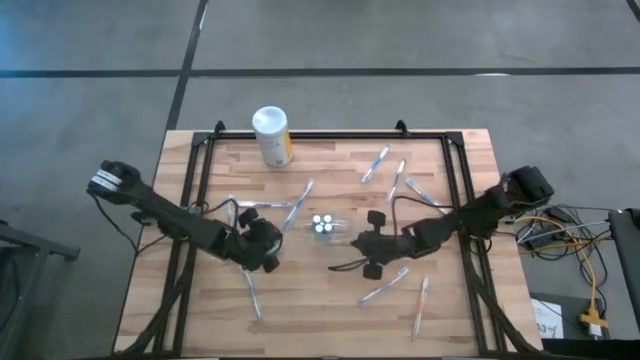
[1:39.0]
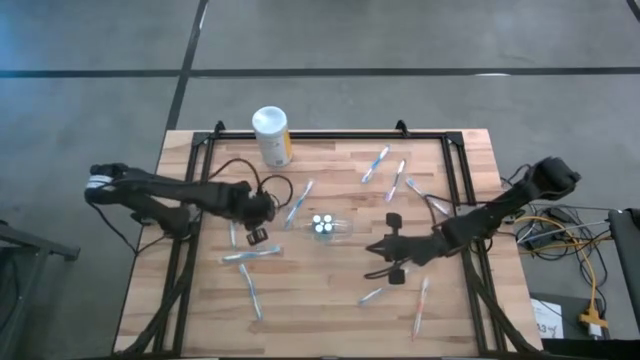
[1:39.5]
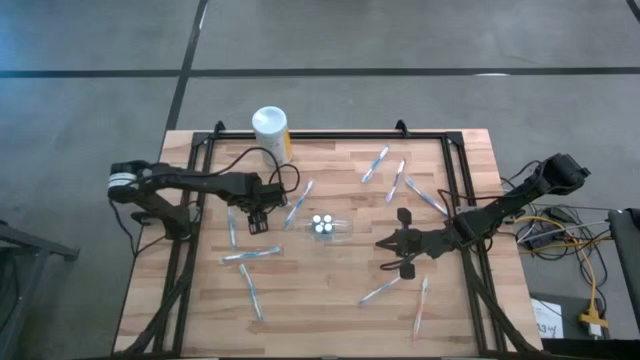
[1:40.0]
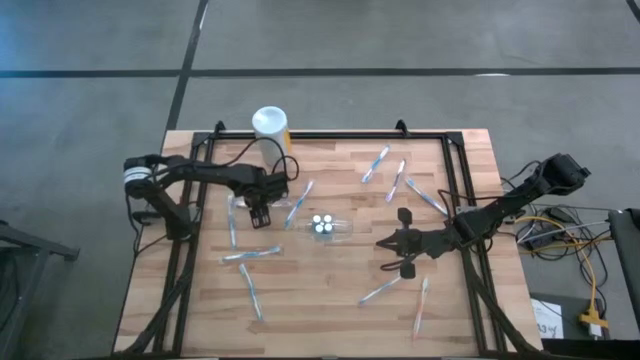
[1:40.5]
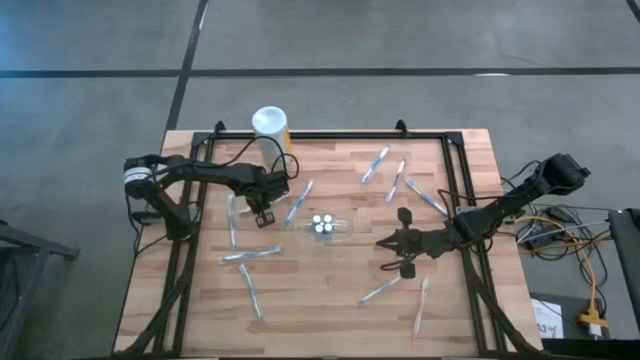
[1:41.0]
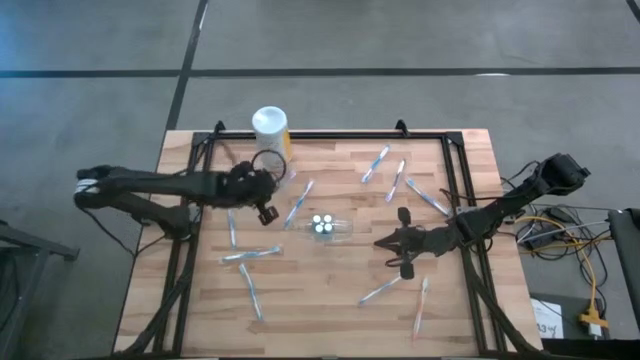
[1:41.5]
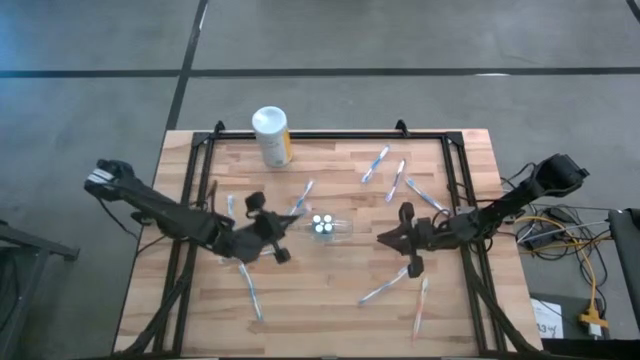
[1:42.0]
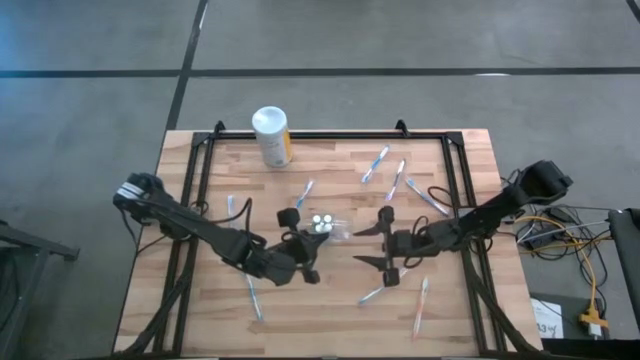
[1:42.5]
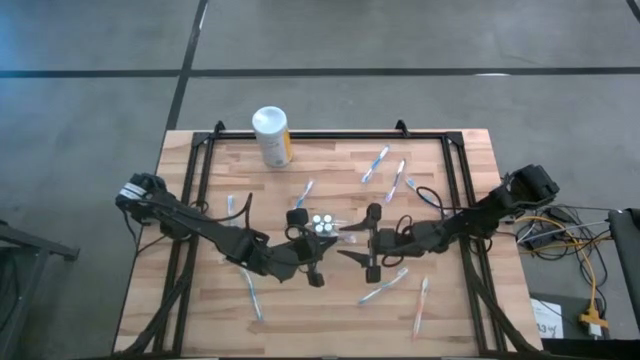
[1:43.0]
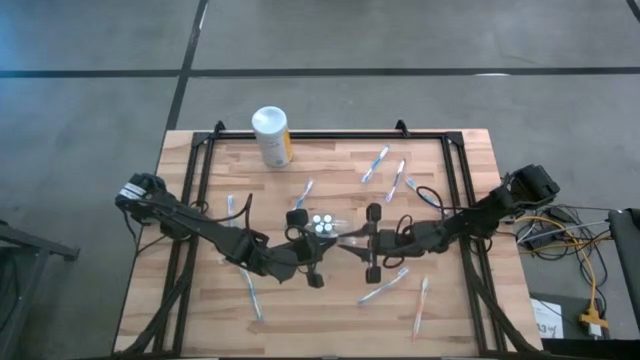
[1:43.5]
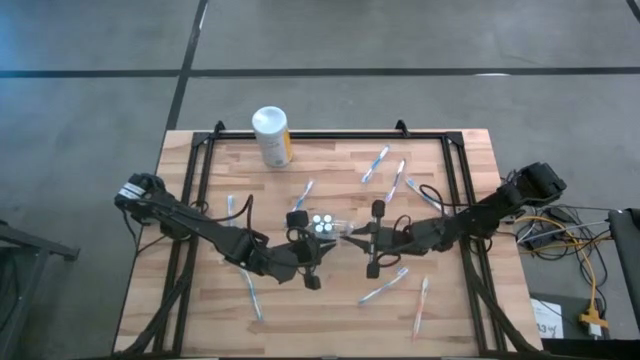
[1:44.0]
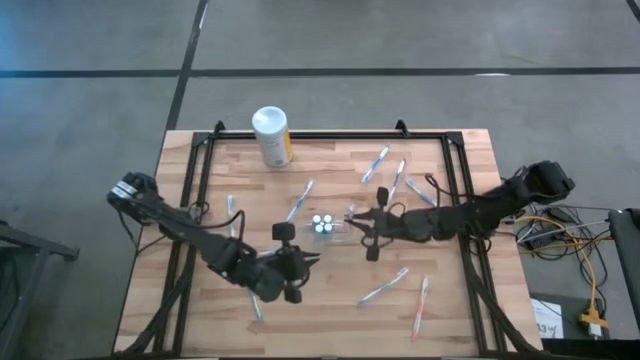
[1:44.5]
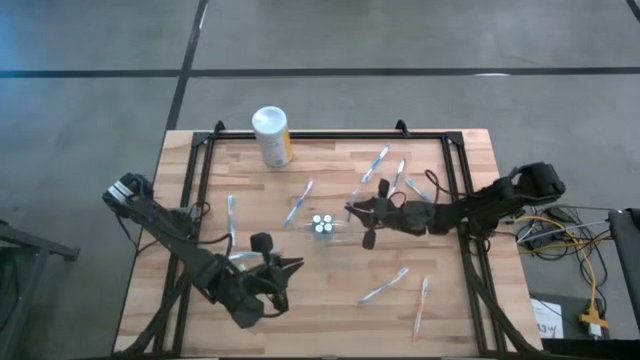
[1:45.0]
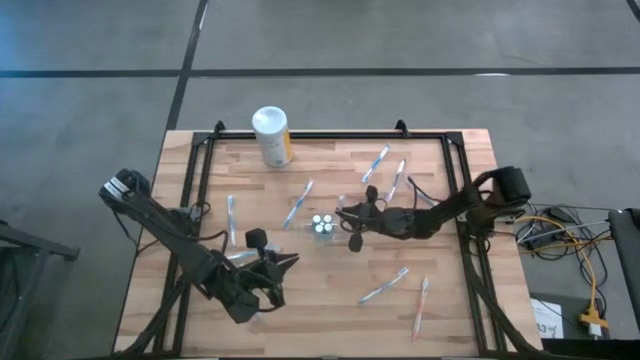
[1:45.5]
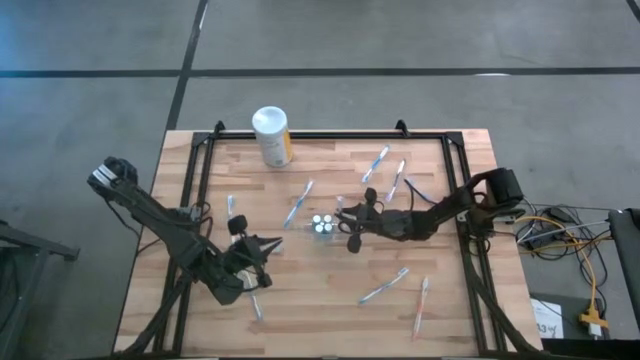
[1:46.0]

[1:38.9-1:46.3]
Task: Pick & Place toothbrushing station
Put the purple toothbrush into the transparent organizer

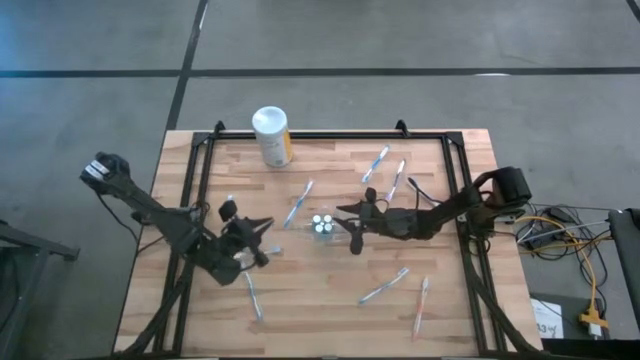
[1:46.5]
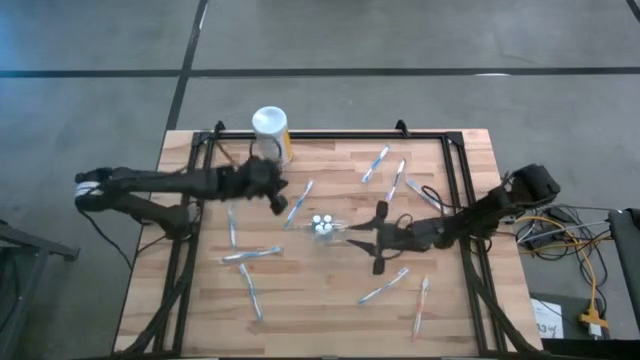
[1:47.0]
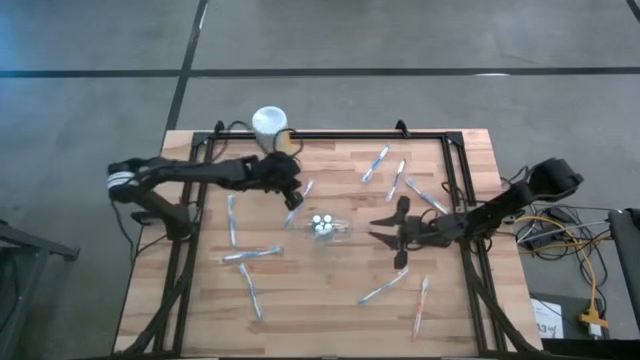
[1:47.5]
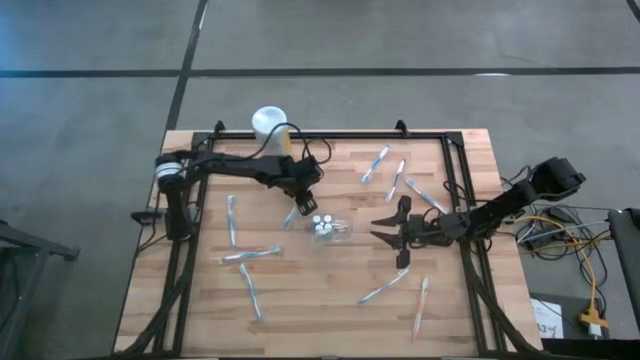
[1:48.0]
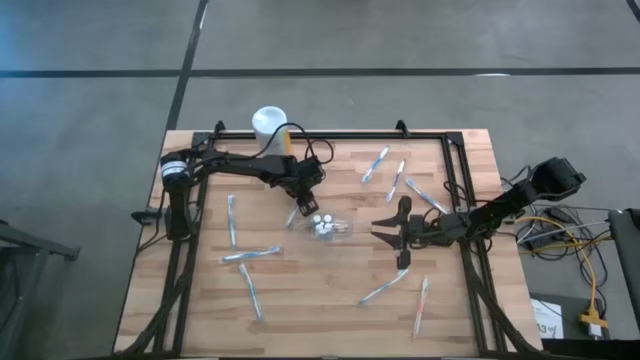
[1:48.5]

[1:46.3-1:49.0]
Put the blue toothbrush into the transparent organizer

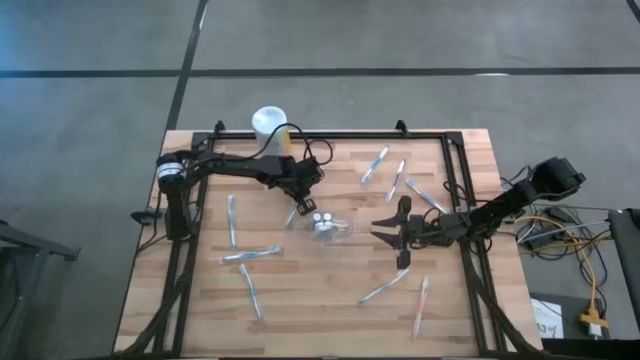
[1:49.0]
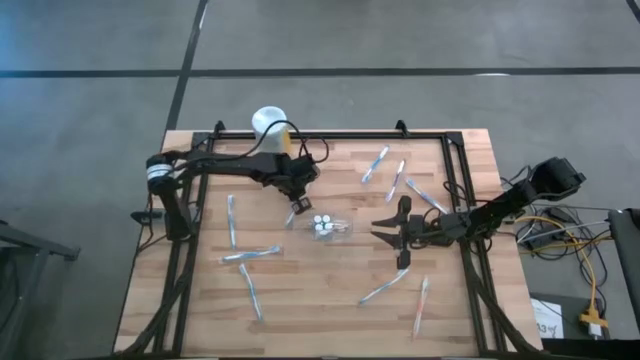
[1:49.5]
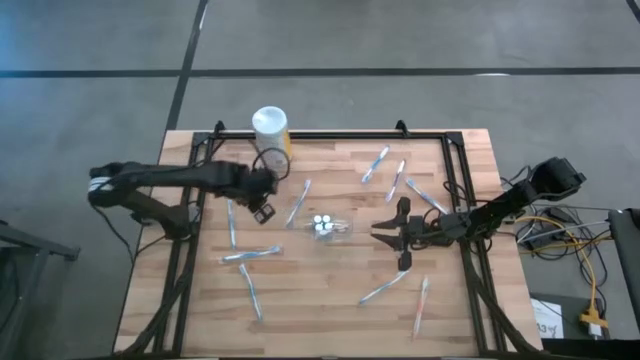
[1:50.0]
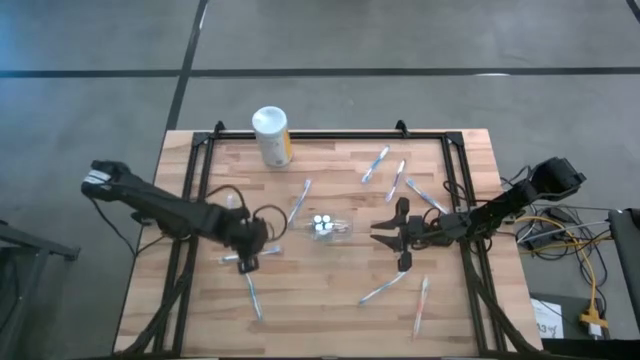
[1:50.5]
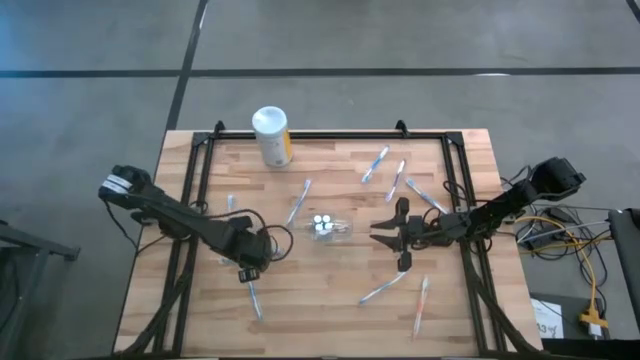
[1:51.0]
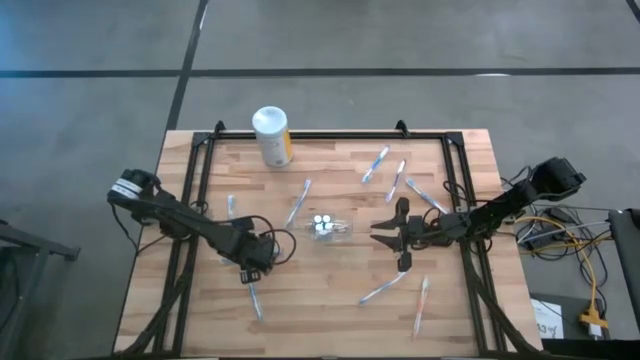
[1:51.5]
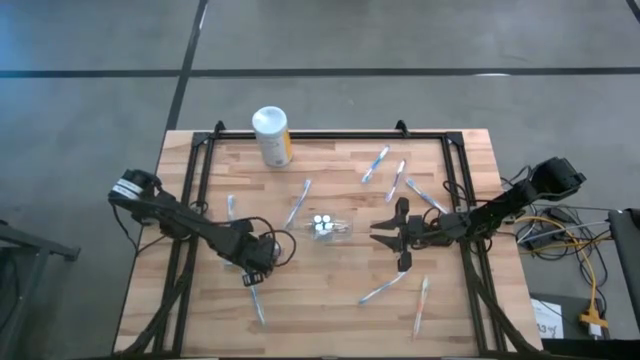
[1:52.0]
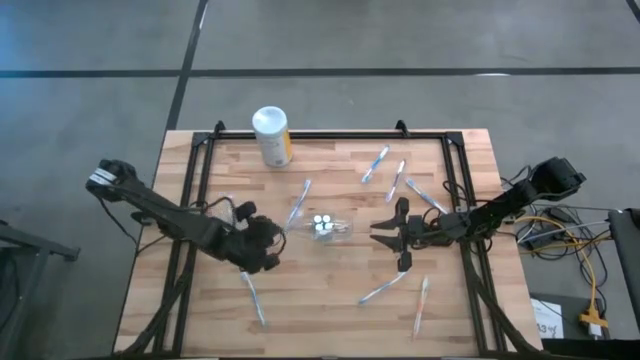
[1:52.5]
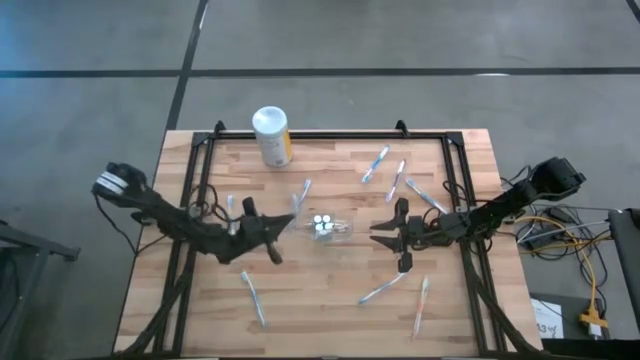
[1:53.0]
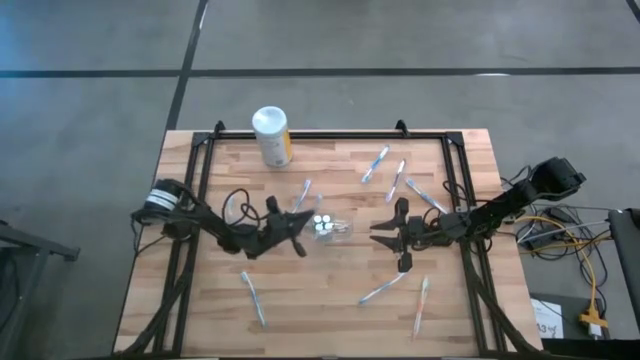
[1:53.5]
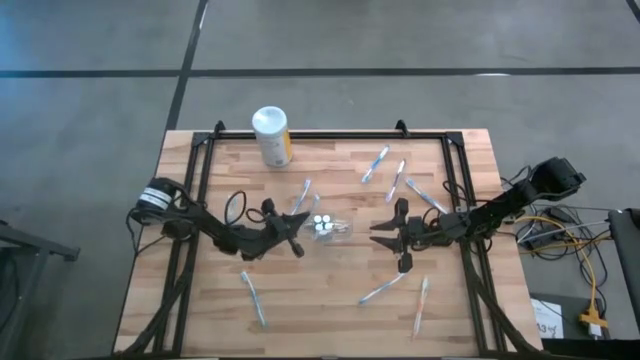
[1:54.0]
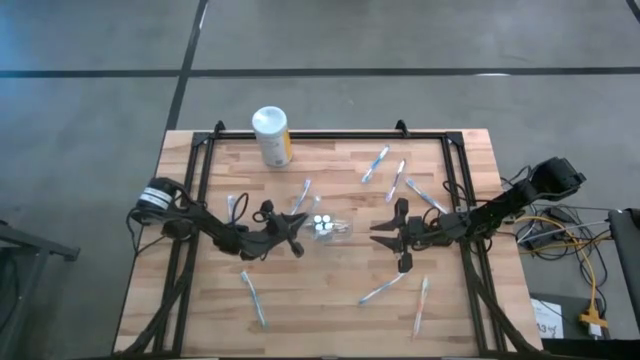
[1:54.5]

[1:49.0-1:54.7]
Put the blue toothbrush into the transparent organizer

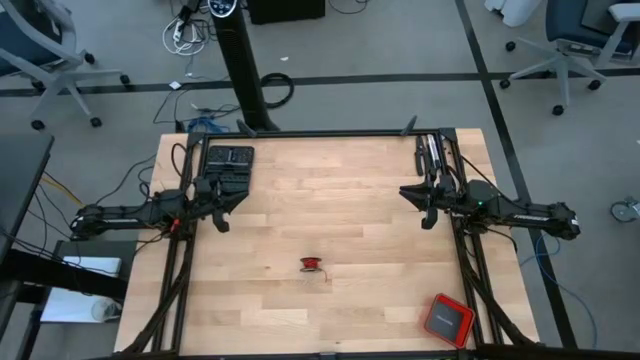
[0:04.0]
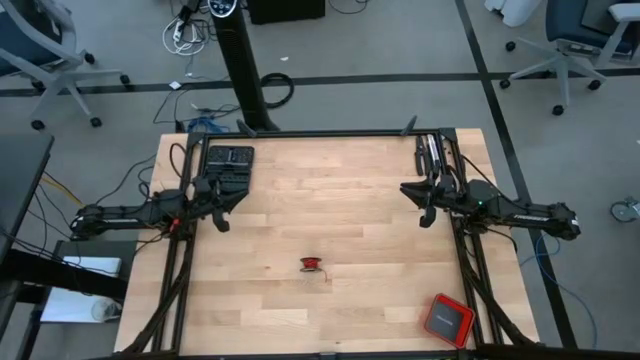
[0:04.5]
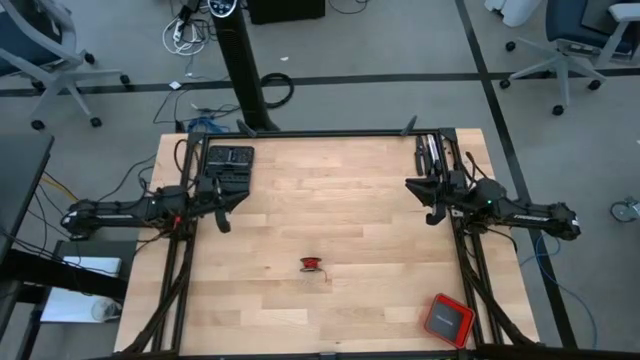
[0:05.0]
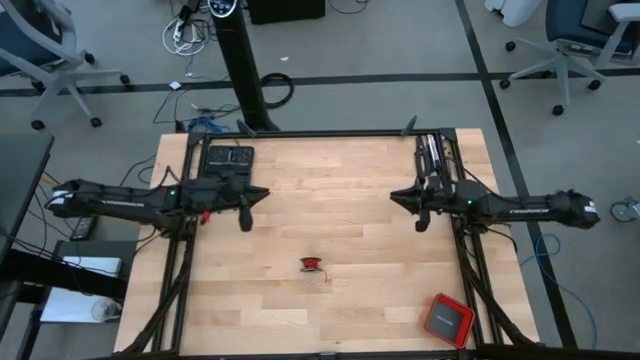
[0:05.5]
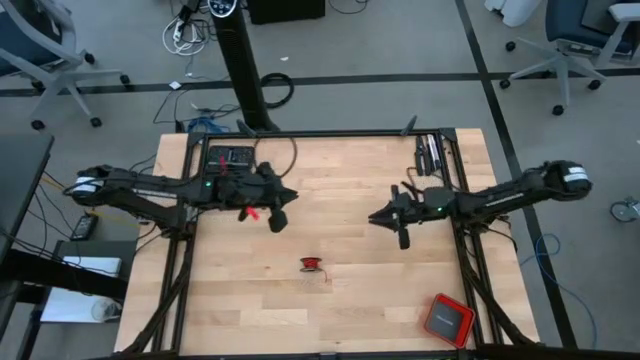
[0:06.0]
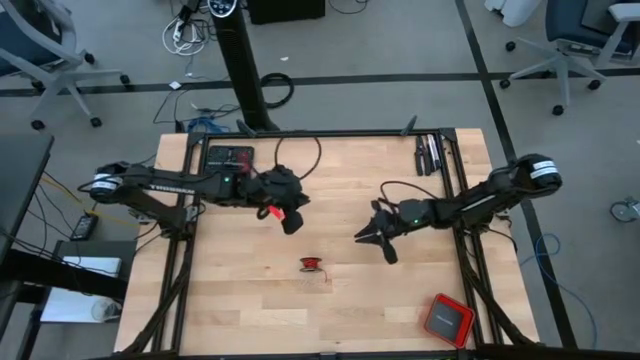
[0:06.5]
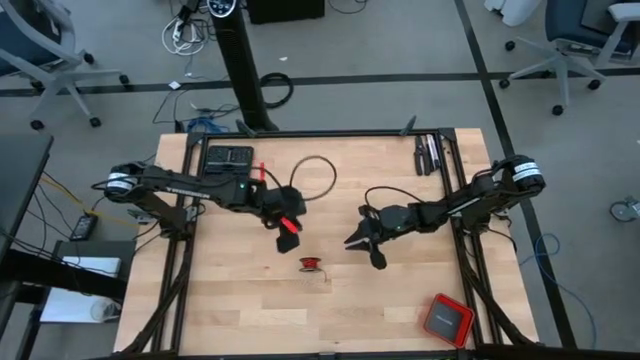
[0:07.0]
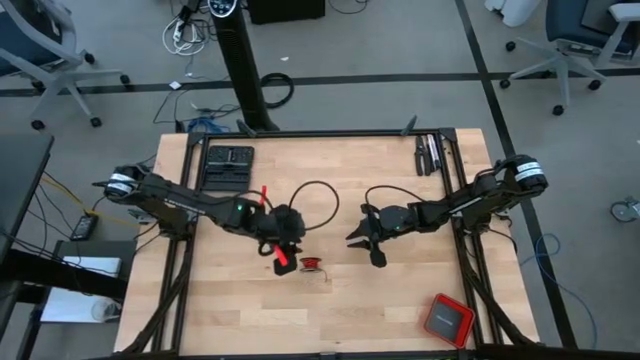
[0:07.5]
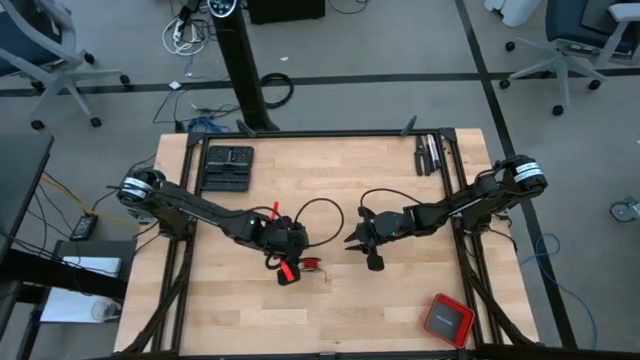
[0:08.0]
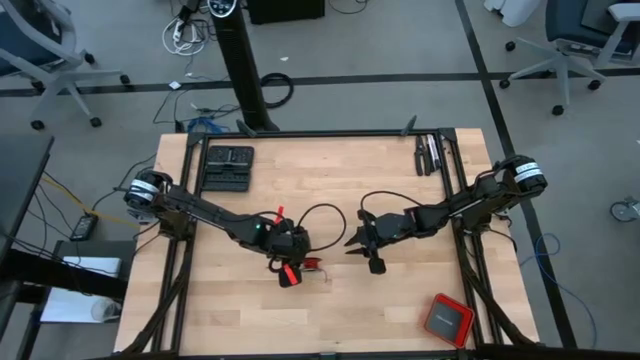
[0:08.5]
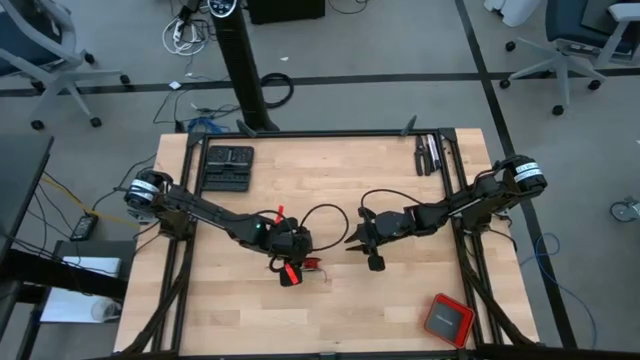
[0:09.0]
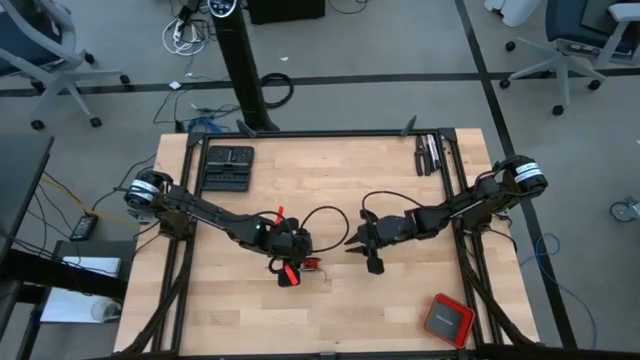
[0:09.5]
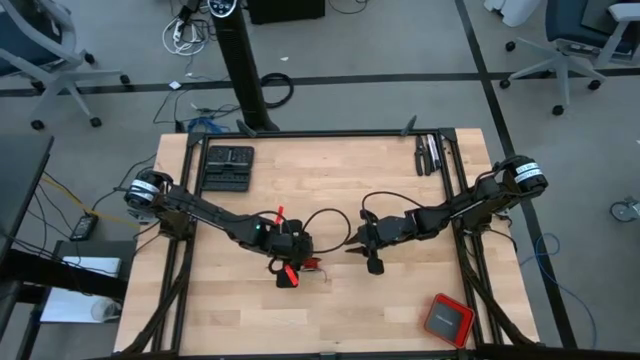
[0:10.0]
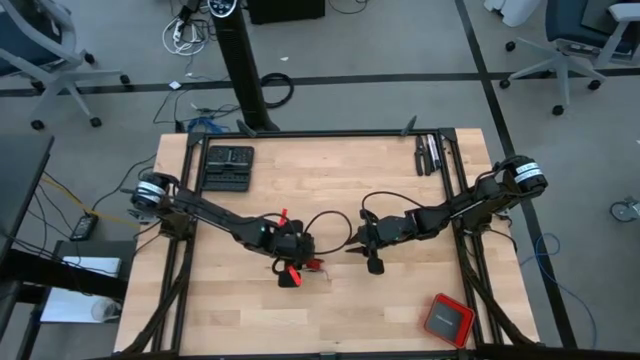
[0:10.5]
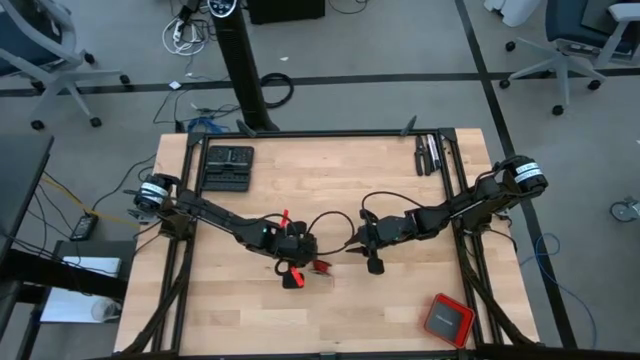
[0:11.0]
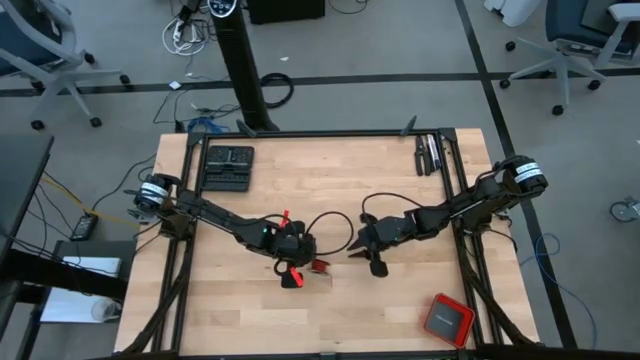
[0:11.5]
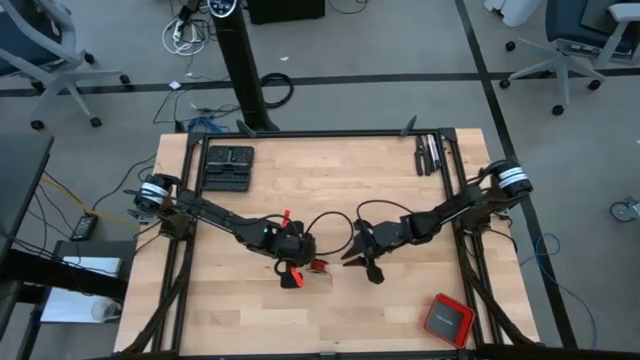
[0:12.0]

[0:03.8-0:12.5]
Task: Coil cords
Uncoil the red wire from the spool
